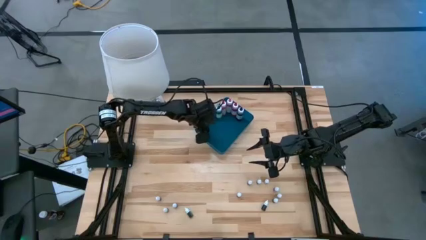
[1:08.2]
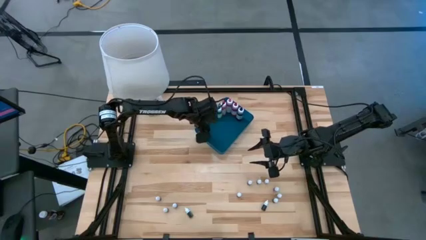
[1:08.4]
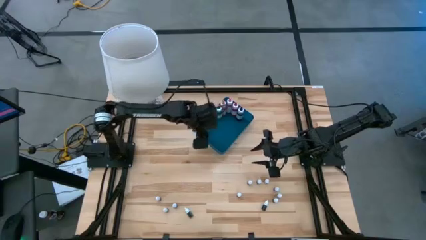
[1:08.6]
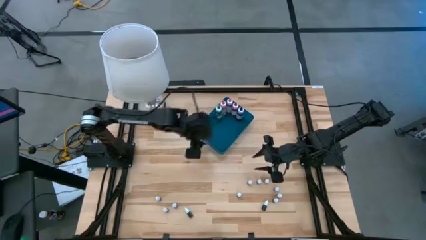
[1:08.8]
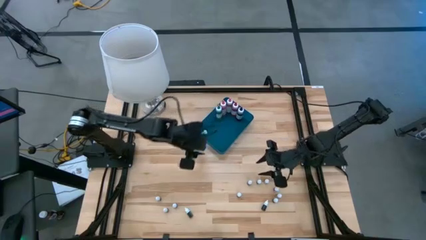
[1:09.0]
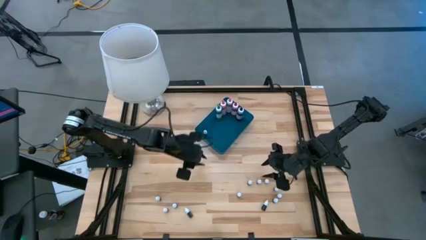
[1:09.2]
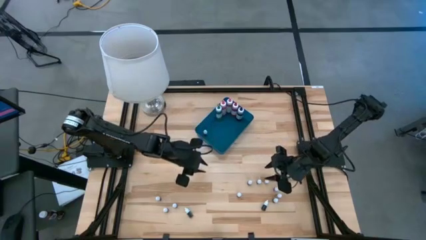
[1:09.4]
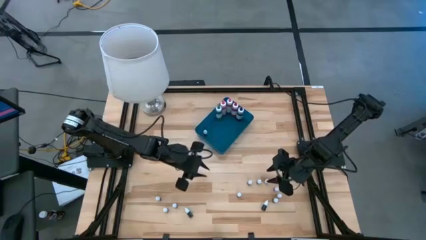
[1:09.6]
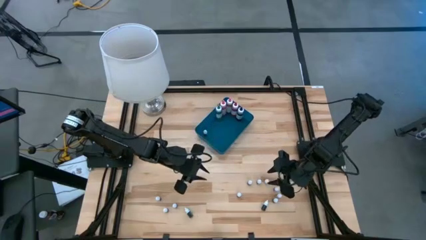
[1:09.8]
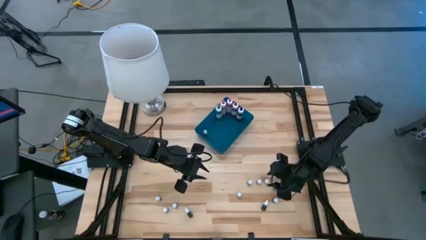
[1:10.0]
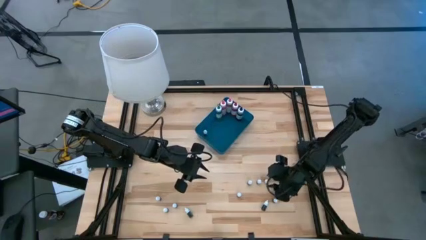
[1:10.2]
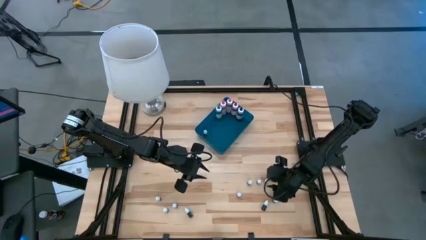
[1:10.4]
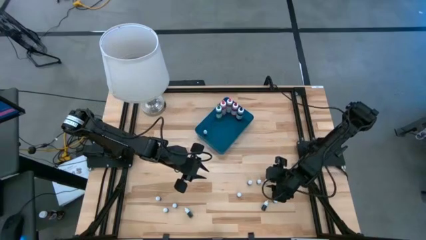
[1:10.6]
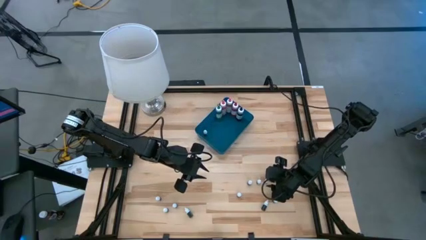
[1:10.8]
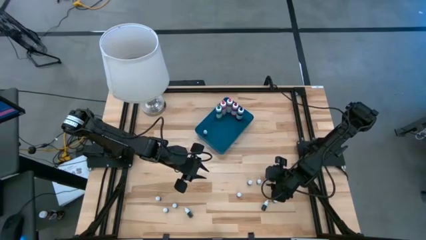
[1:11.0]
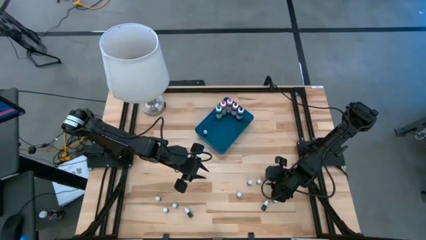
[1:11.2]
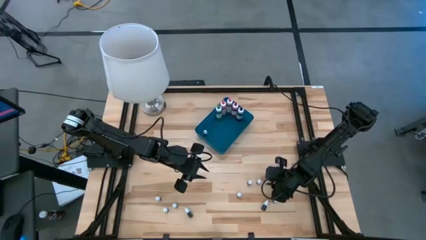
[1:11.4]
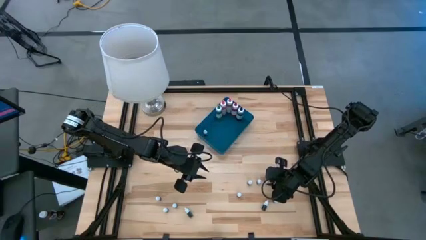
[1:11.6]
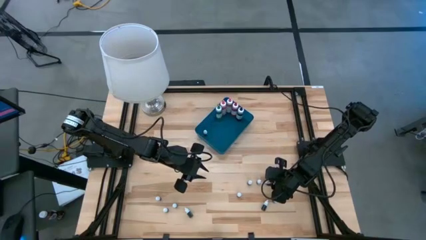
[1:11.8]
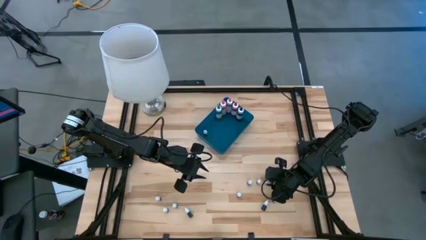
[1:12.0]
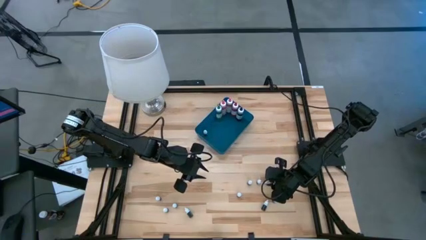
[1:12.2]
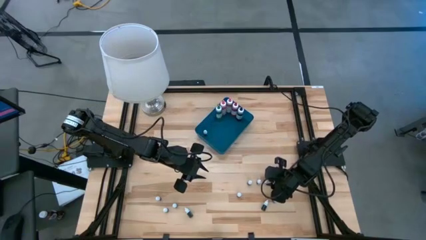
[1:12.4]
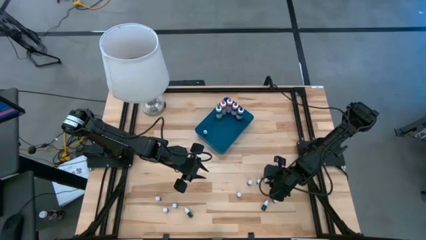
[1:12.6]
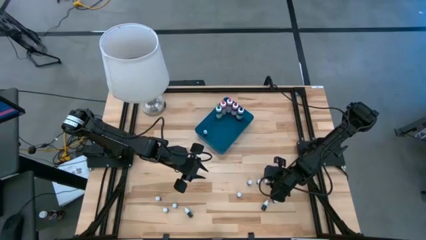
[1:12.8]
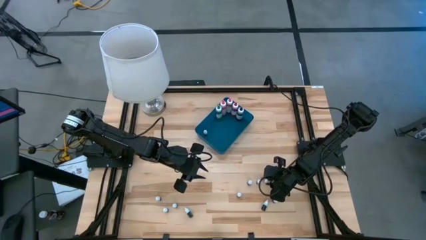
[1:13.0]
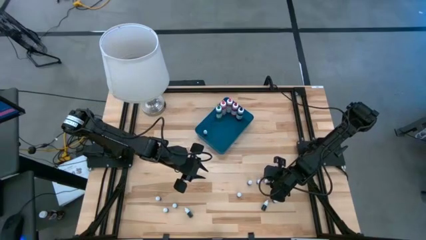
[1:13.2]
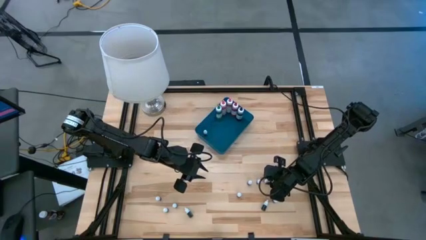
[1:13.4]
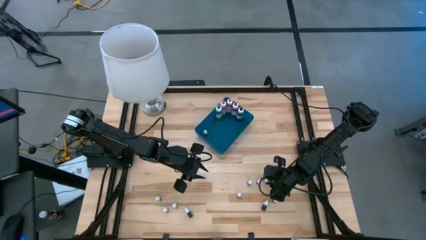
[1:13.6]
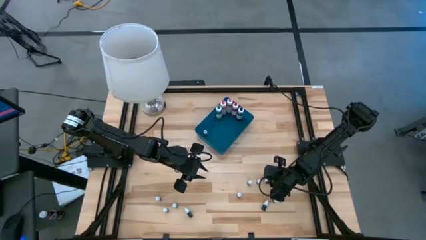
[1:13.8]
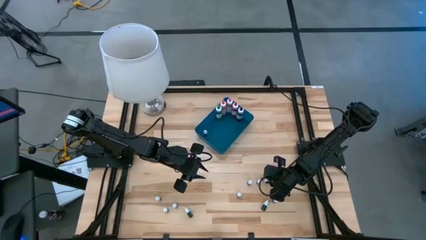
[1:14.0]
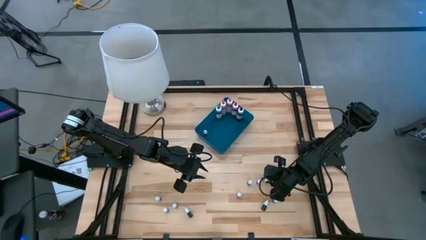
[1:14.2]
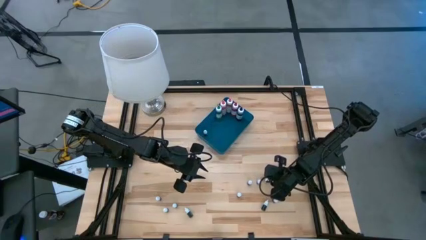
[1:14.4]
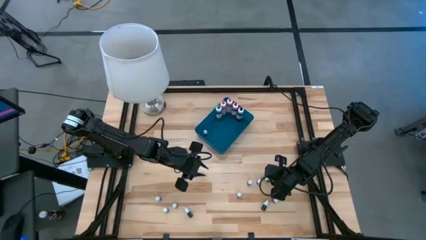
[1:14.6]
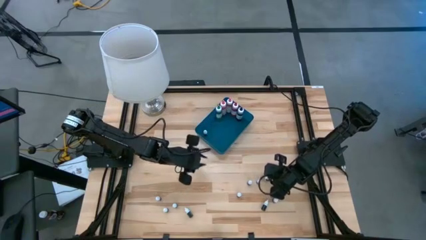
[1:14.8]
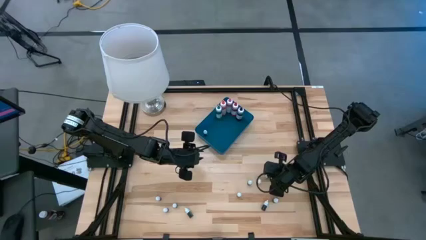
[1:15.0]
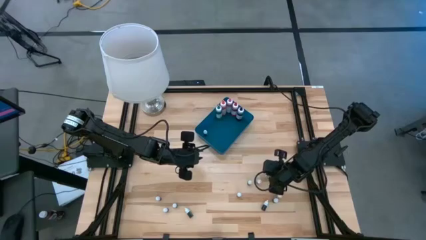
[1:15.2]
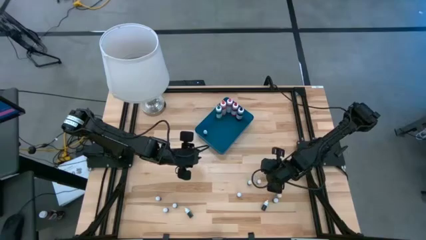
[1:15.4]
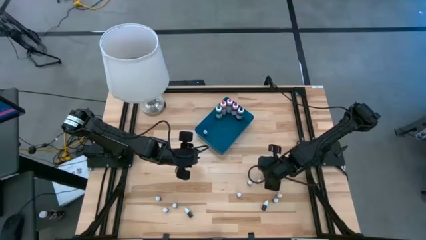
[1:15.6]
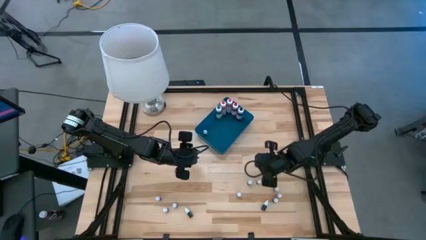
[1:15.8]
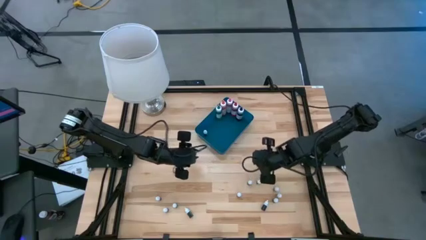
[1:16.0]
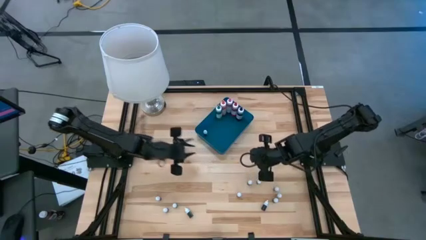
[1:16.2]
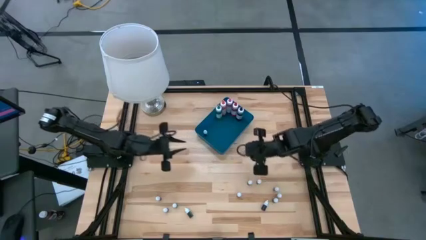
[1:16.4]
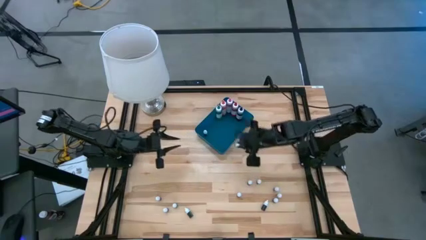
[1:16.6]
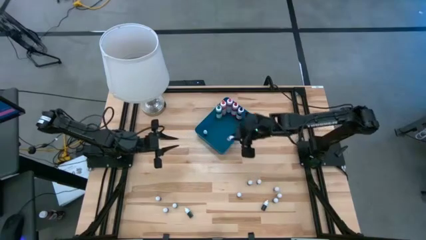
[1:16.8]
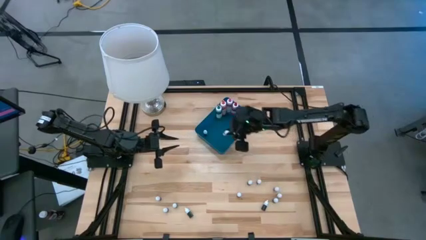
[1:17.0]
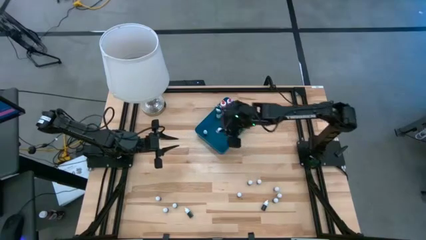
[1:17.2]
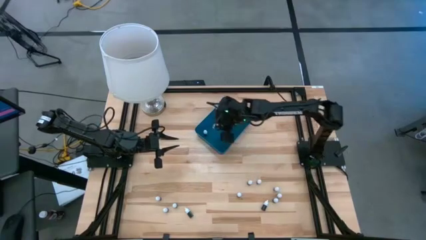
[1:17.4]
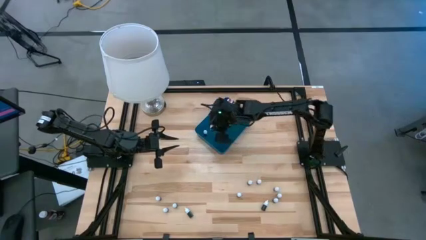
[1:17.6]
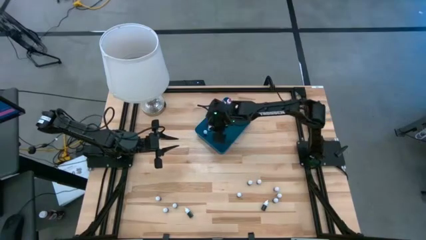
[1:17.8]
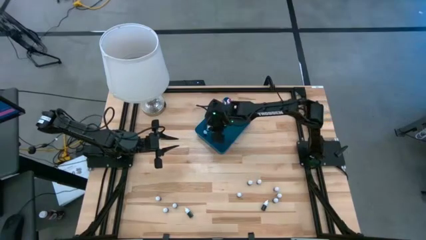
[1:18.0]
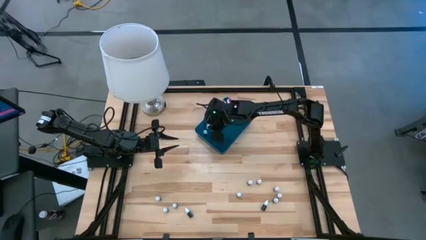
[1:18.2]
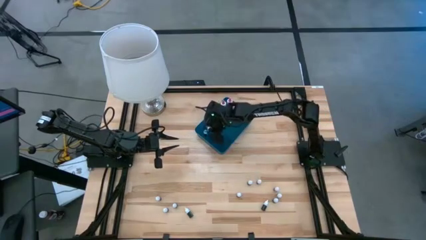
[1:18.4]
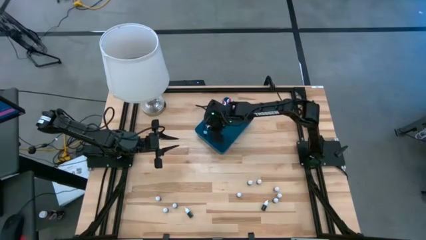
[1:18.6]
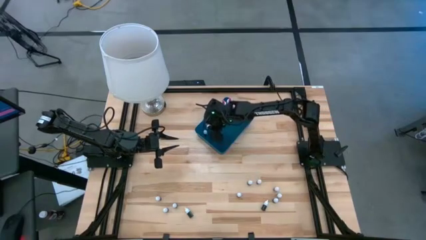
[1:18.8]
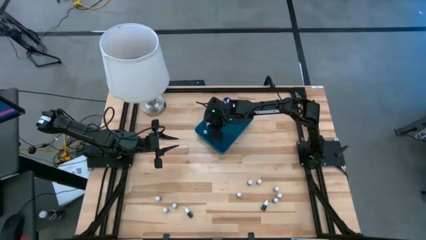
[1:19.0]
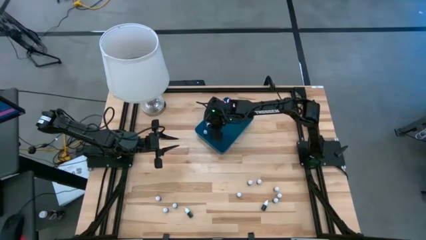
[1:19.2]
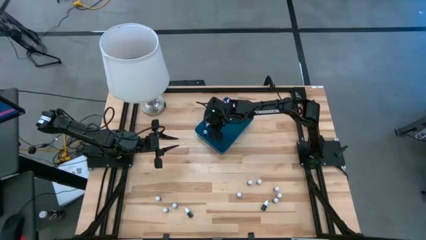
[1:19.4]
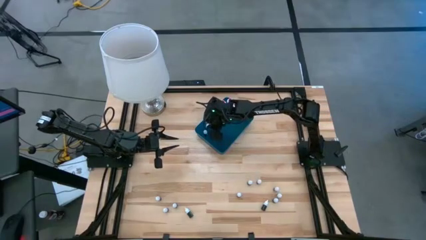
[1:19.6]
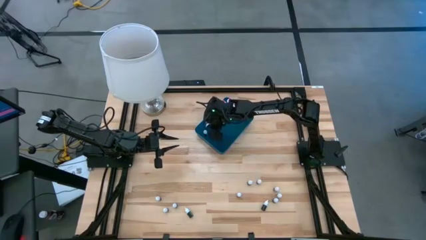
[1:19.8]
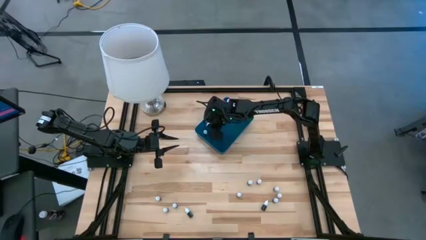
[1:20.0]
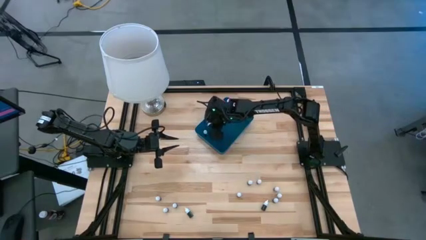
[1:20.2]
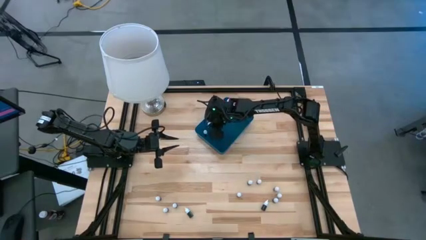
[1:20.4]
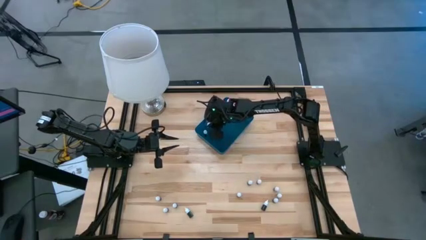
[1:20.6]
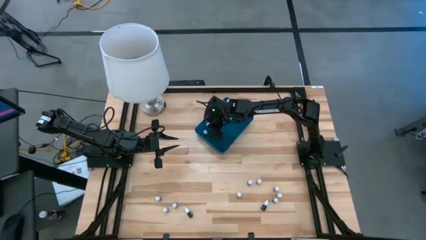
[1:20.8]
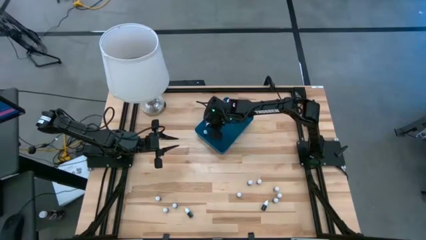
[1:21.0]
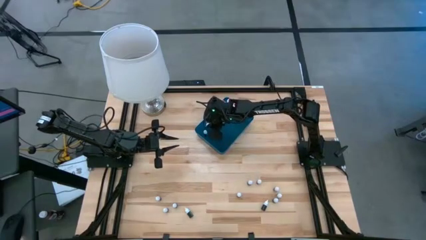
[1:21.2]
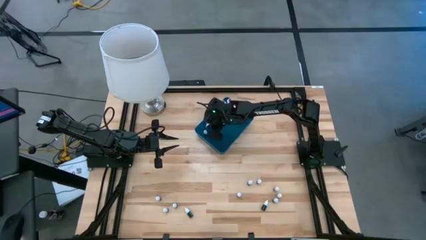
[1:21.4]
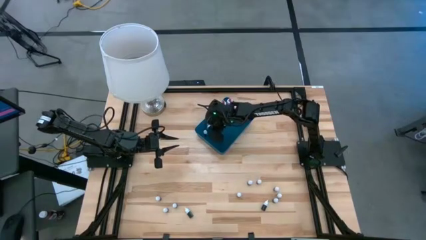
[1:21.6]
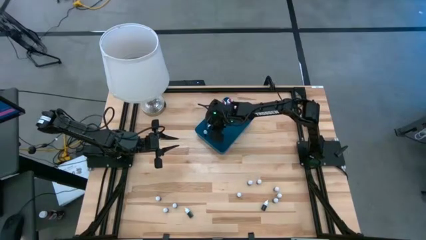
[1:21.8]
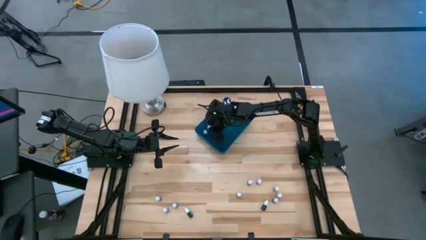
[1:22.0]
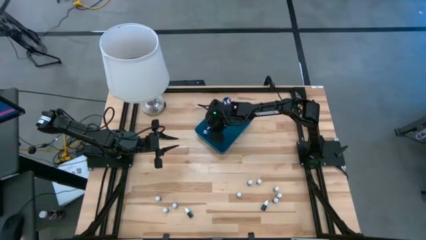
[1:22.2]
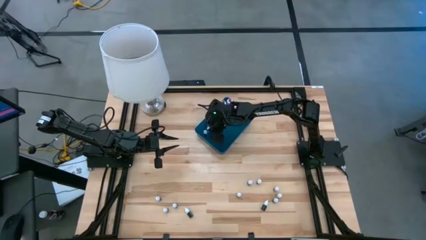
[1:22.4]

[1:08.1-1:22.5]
Task: Pick & Place food coloring
Put the small green food coloring bottle into the blue container
